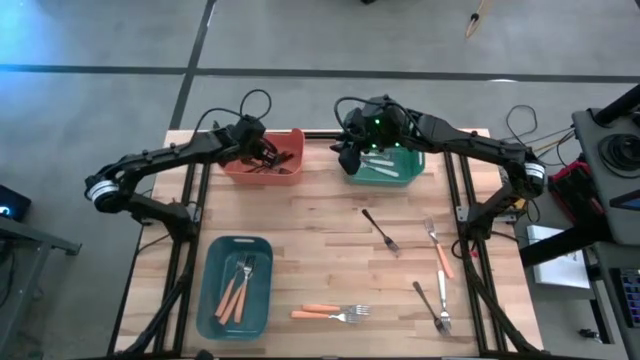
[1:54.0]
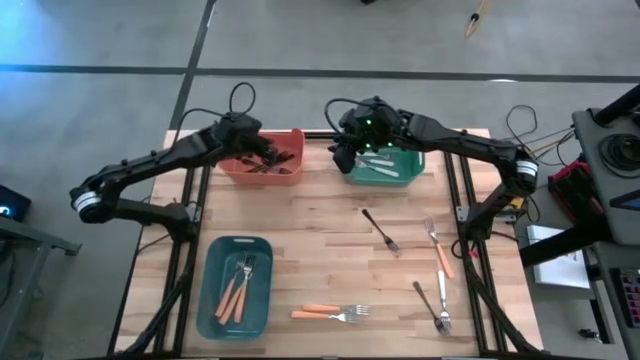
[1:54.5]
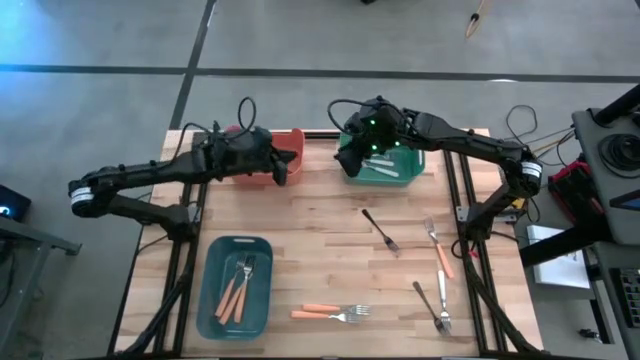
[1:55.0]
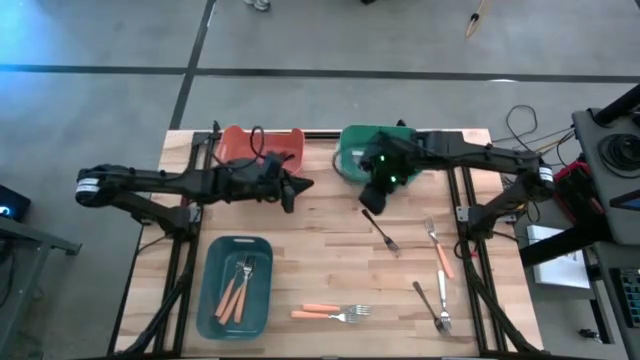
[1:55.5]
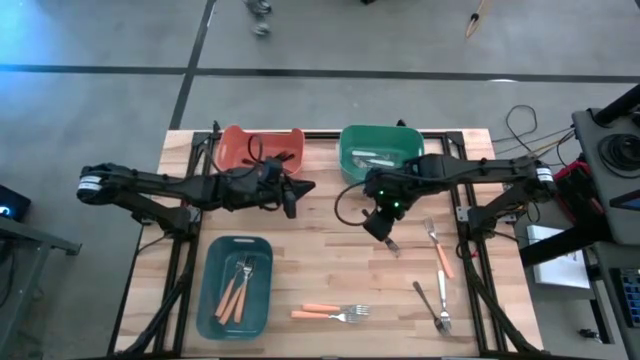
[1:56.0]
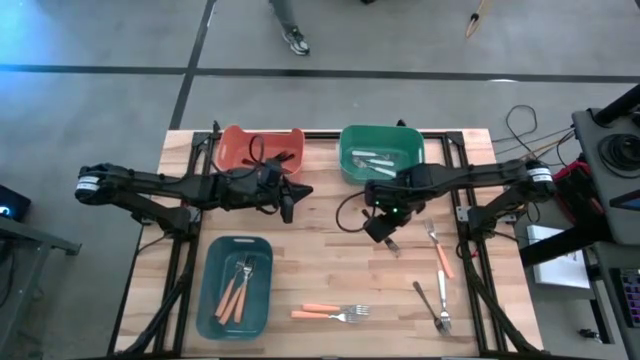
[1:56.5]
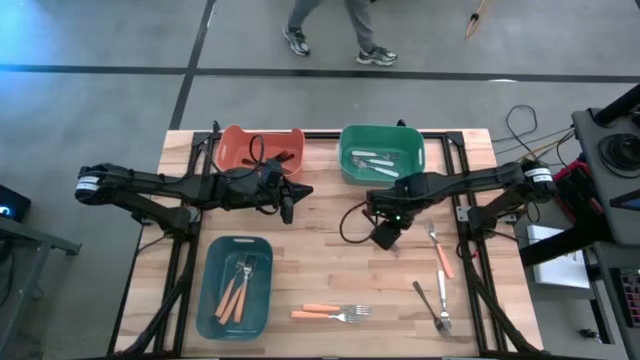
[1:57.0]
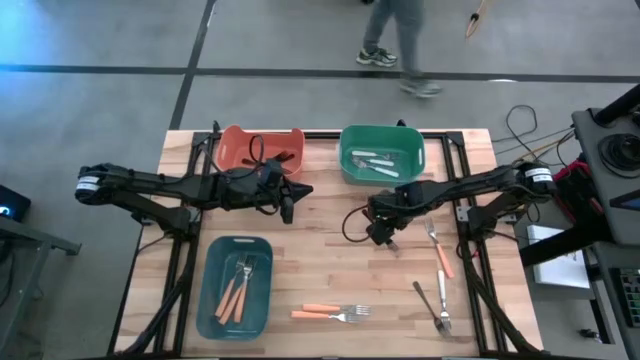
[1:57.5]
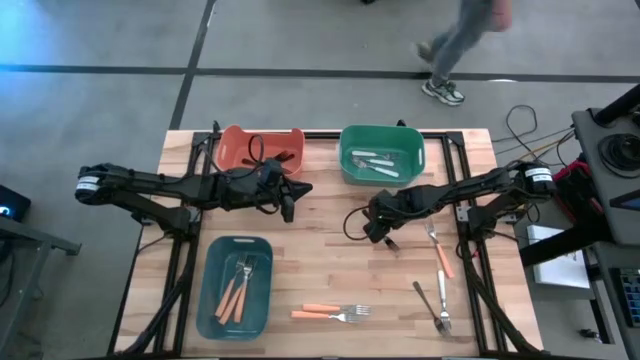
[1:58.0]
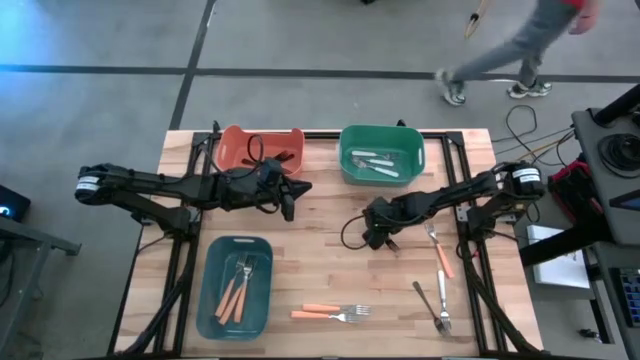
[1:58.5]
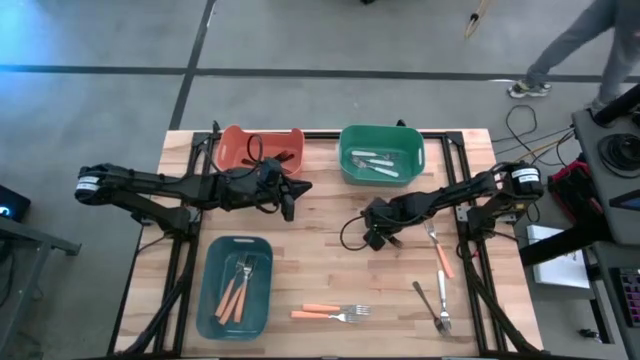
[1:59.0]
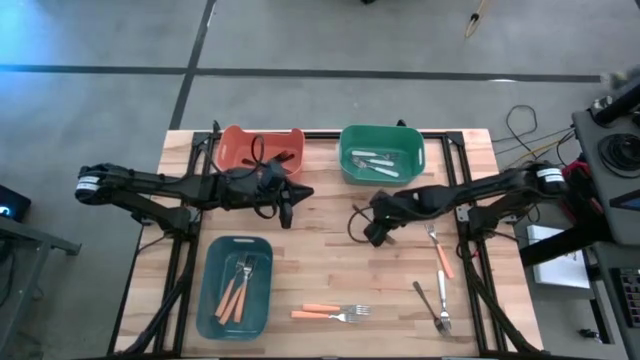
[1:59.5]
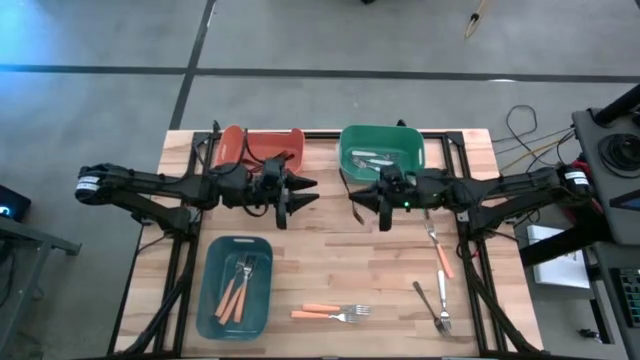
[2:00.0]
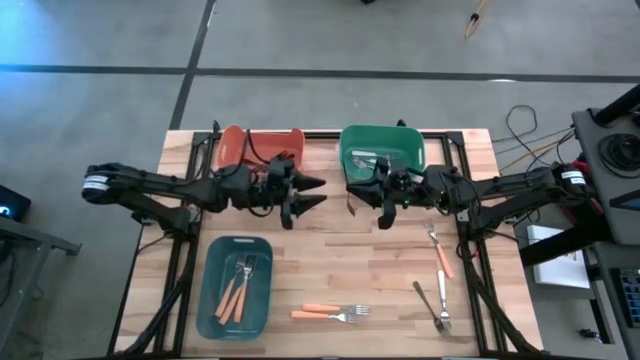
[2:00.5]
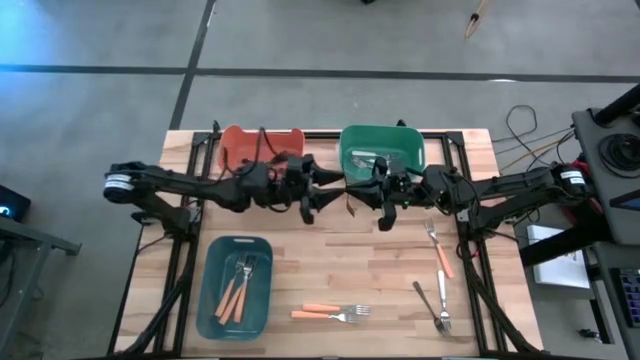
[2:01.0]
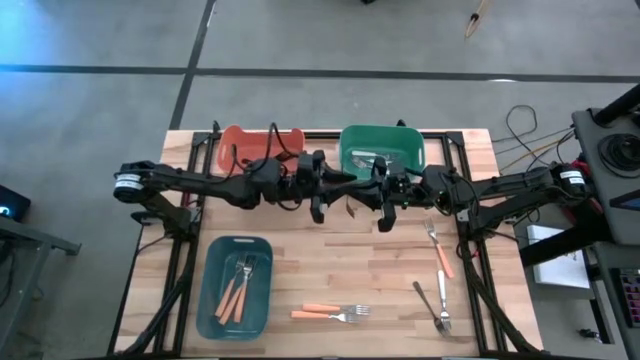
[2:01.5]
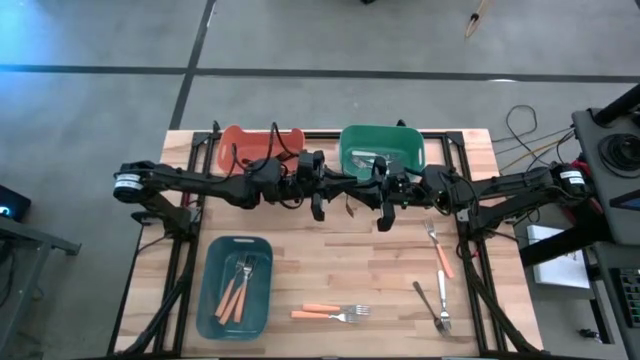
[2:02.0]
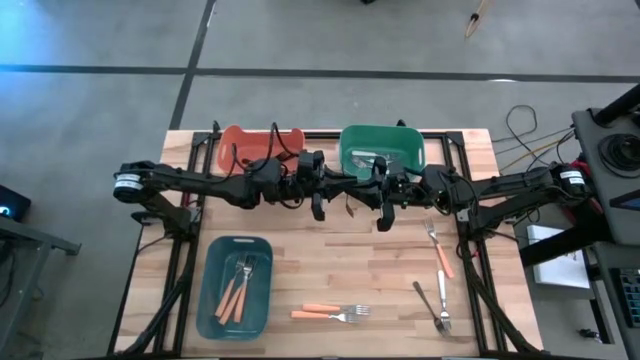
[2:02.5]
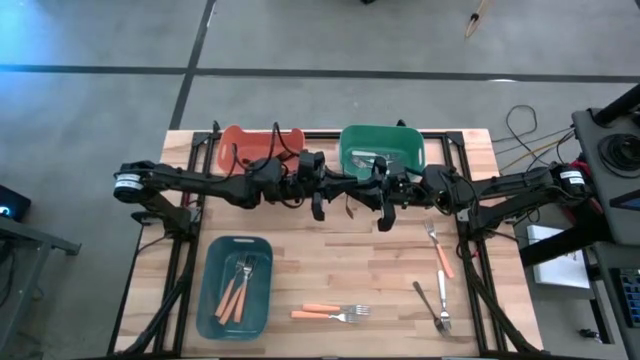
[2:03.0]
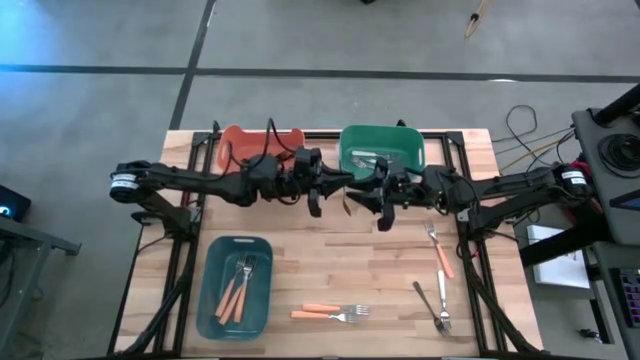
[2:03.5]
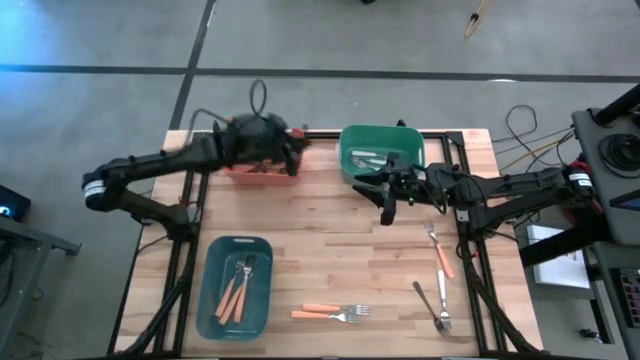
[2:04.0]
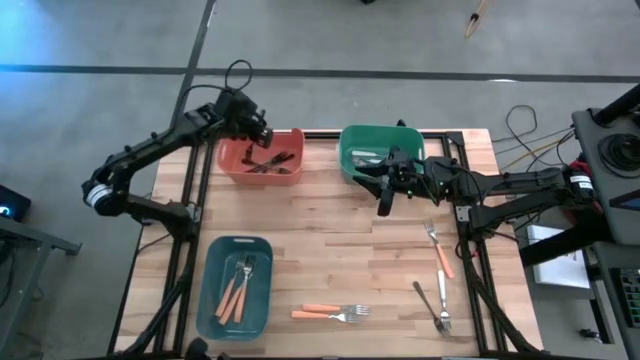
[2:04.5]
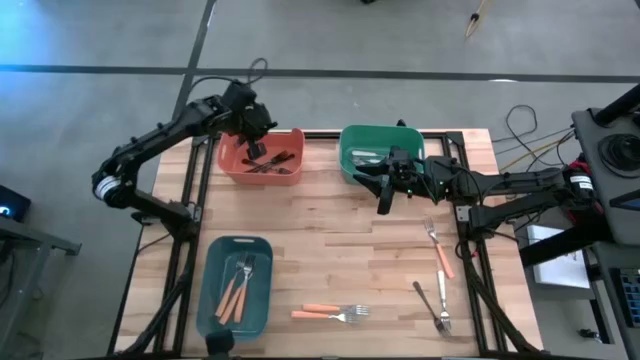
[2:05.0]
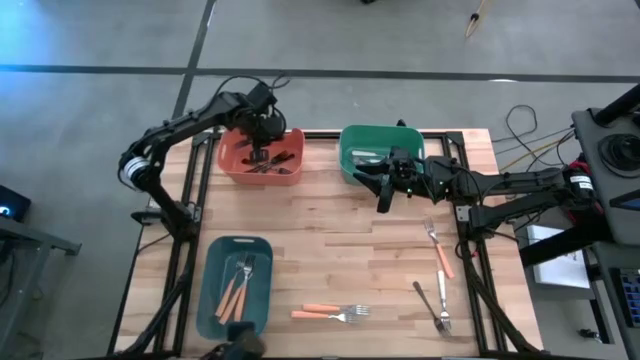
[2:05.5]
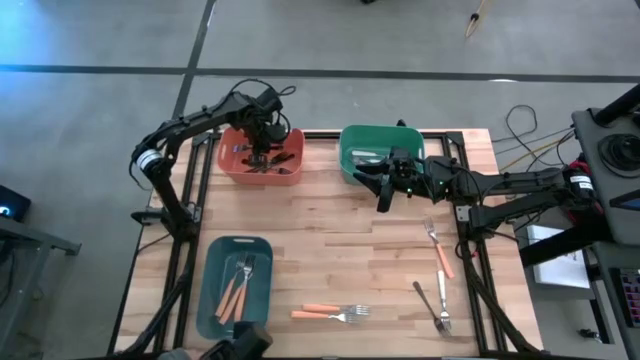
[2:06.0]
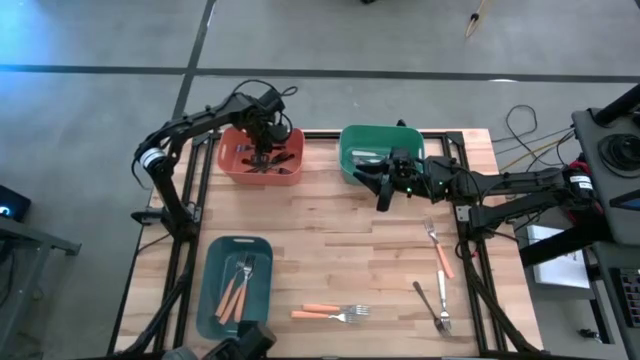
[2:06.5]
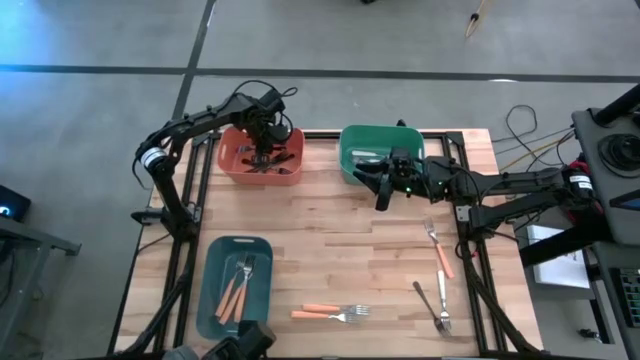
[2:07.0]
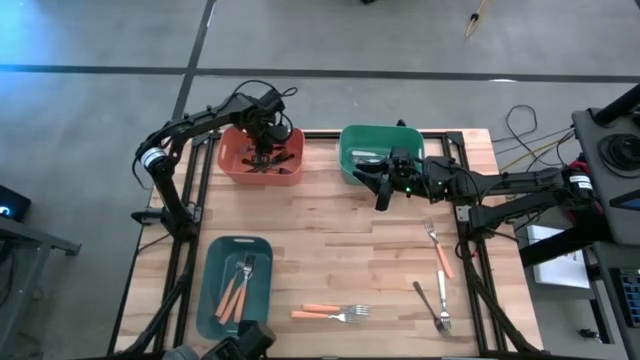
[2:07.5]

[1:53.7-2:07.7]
Task: Sort silverware by color (type)
Put the black fork into the orange bin

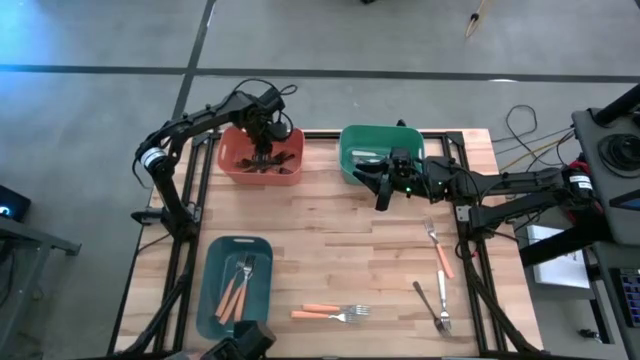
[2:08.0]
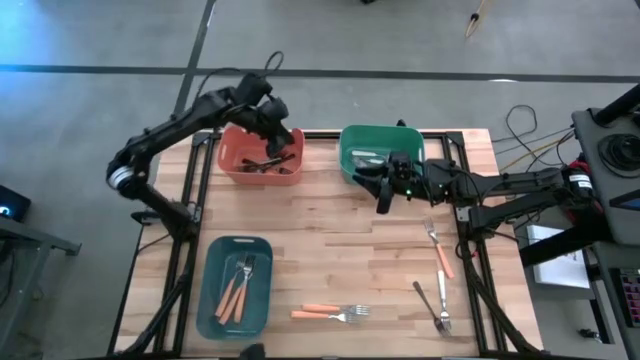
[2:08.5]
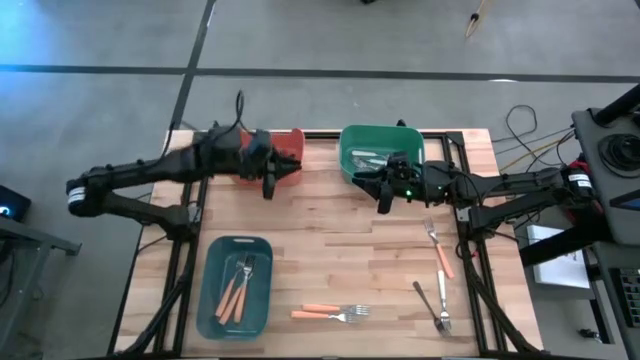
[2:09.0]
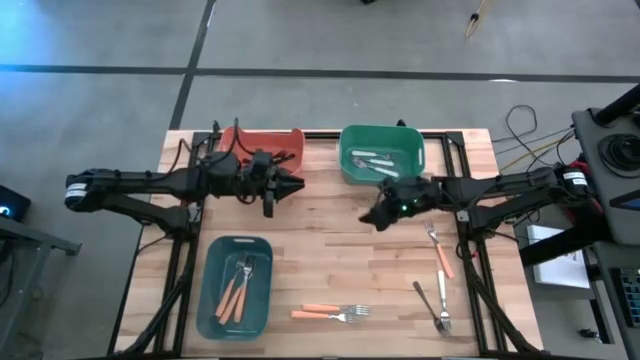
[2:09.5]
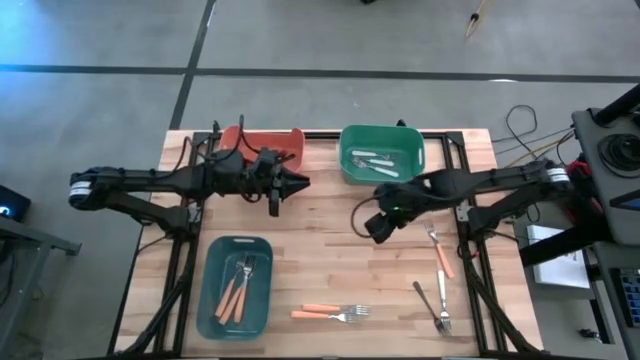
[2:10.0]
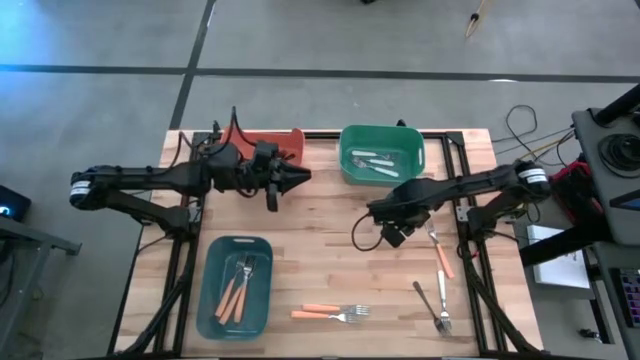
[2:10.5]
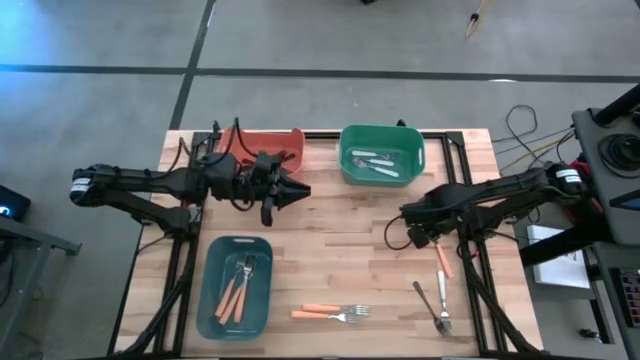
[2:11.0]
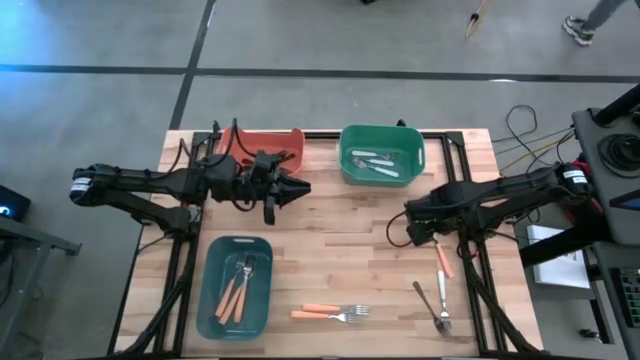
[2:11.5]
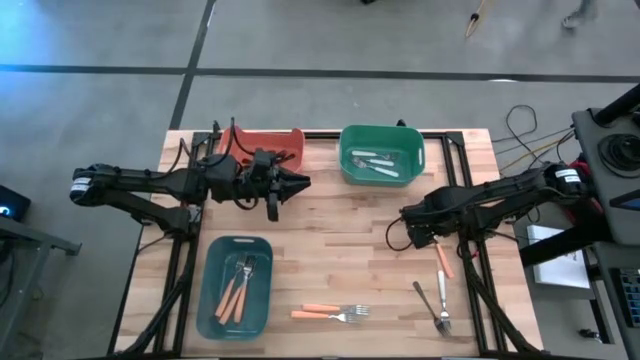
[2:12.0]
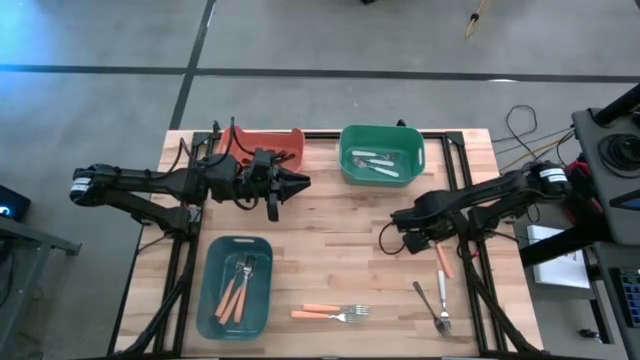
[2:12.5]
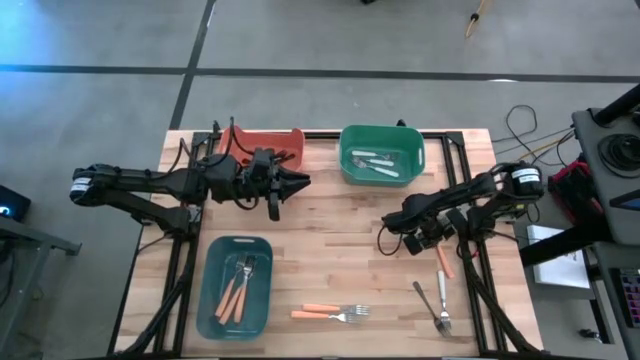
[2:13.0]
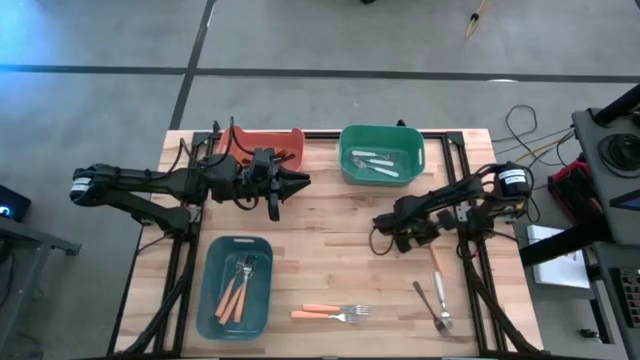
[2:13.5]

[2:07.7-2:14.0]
Put the orange fork into the blue-green bin
